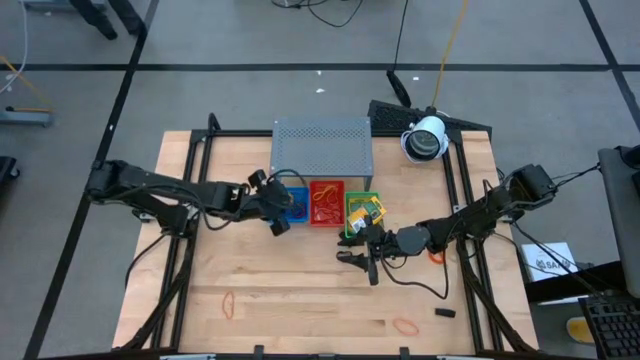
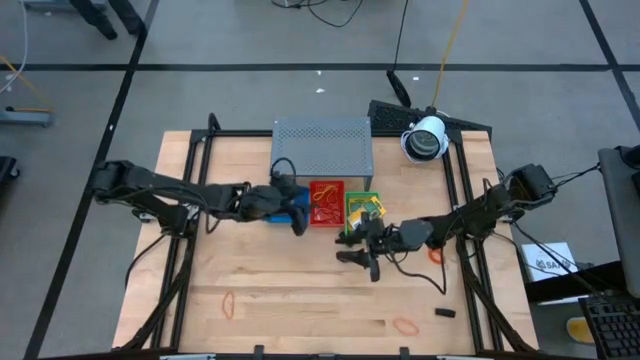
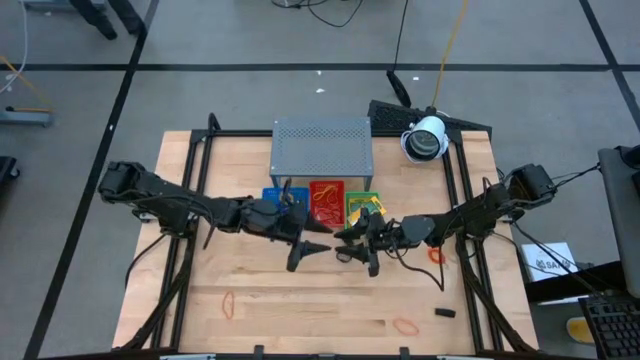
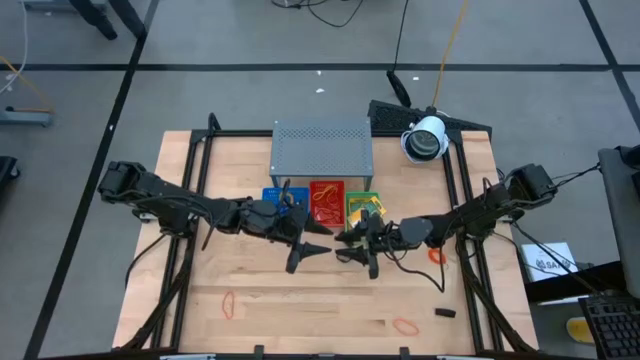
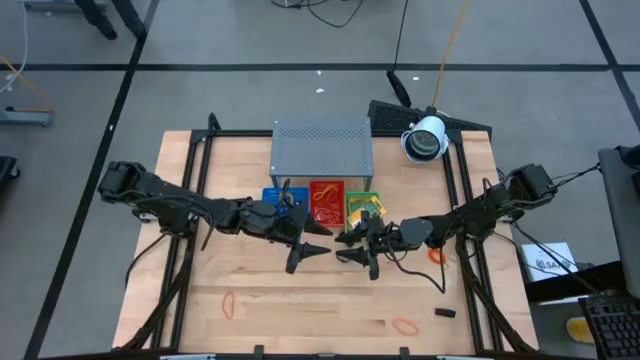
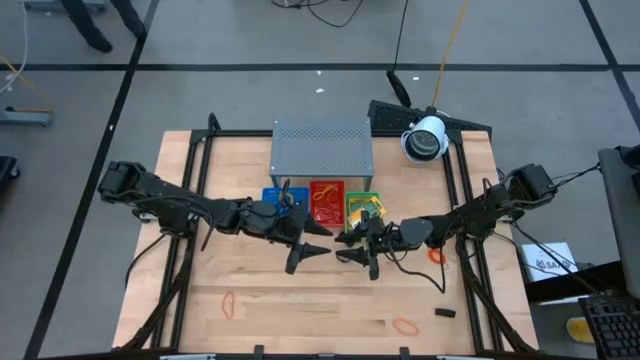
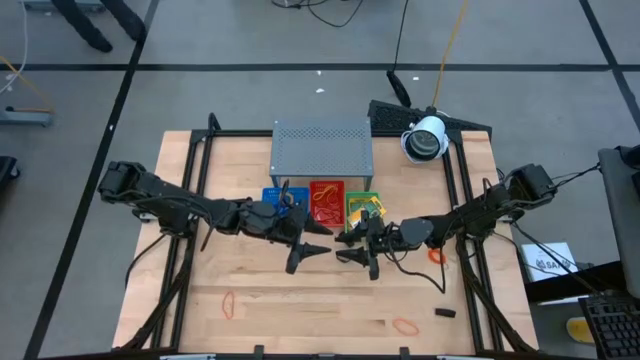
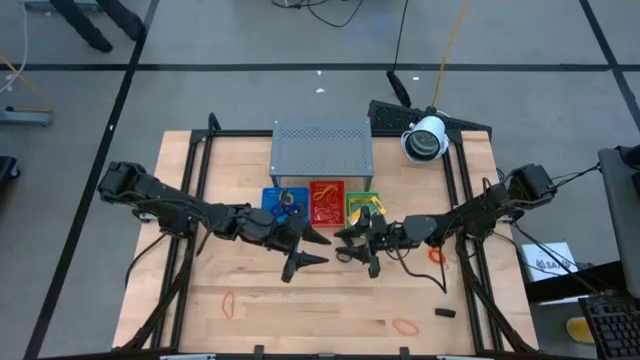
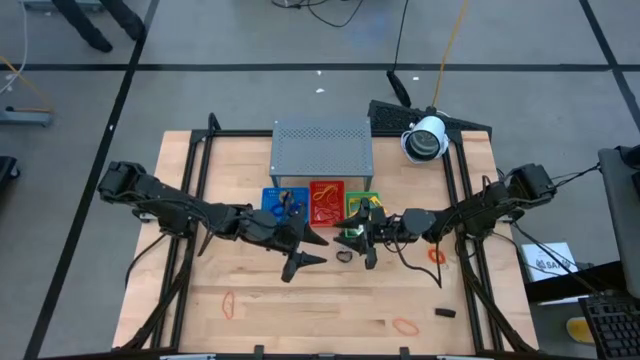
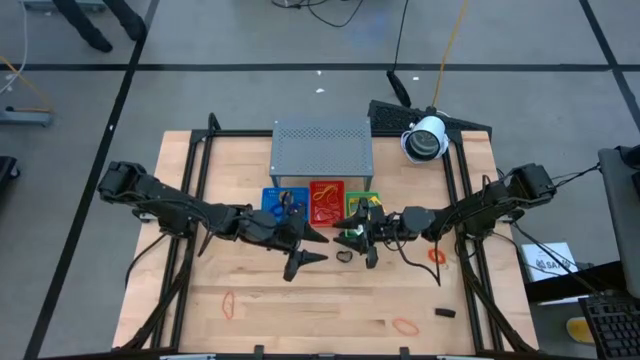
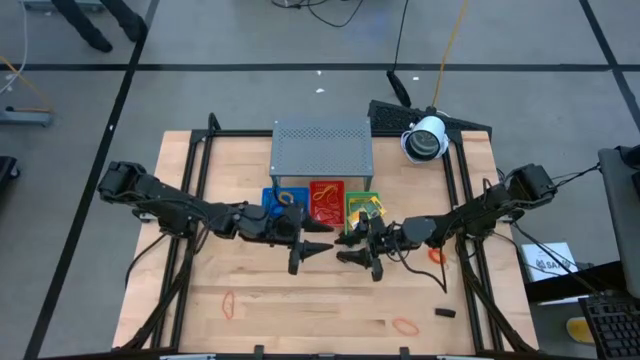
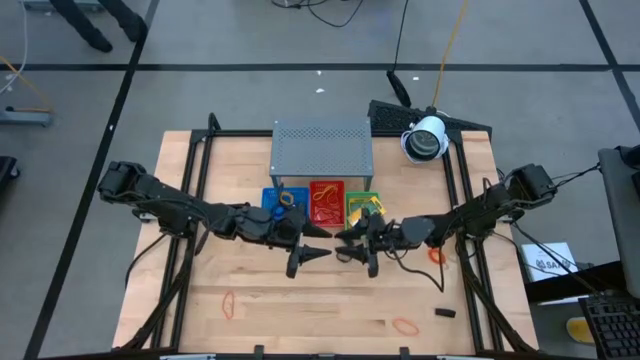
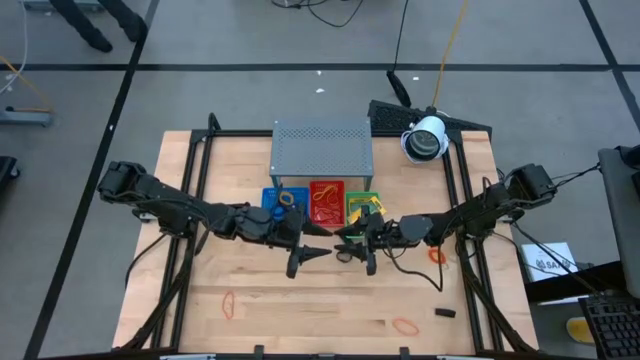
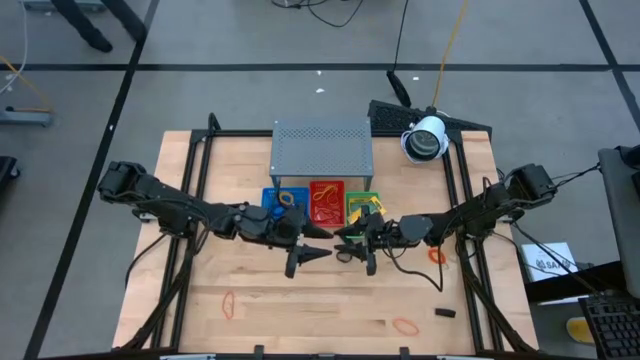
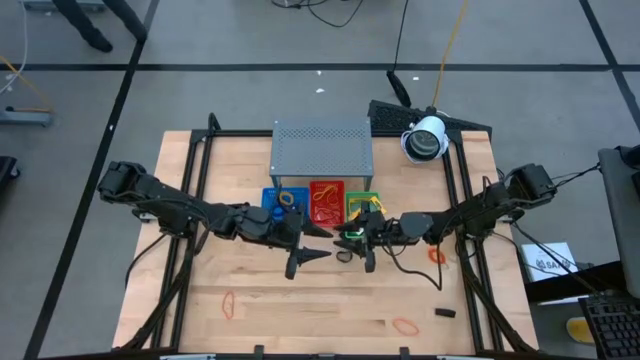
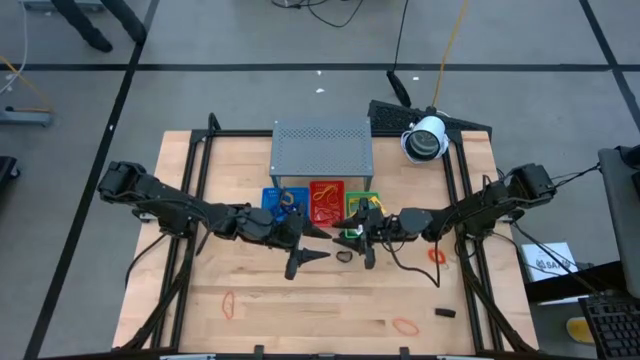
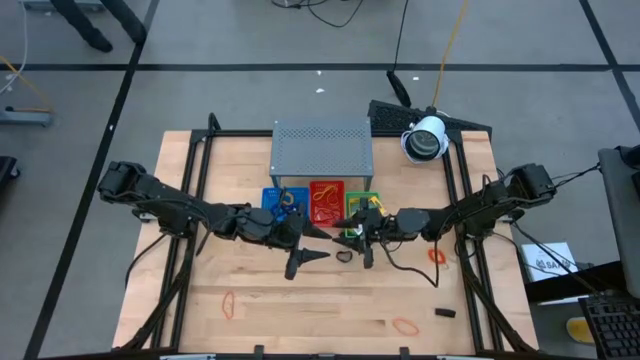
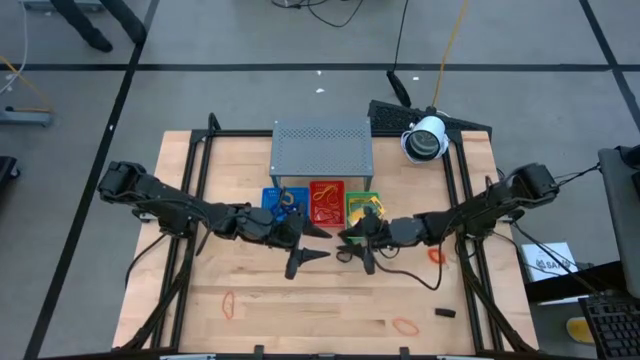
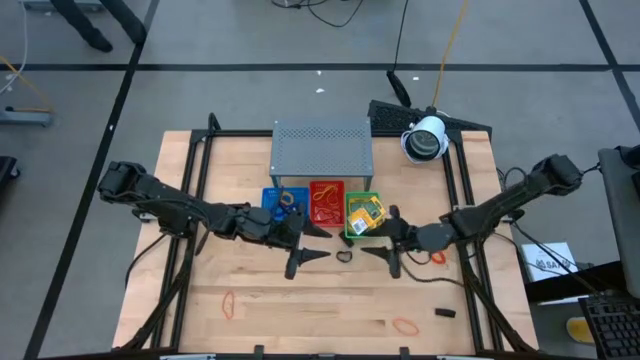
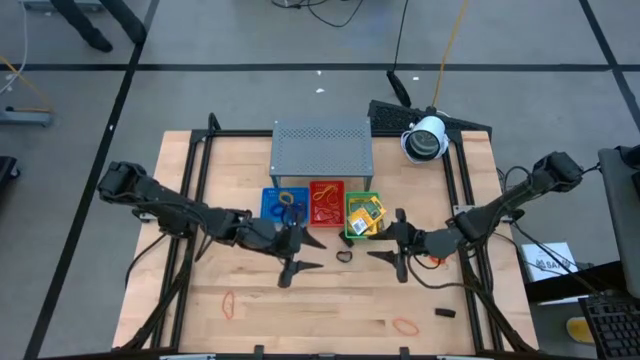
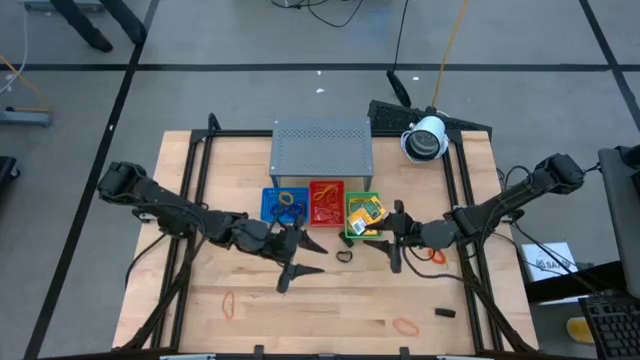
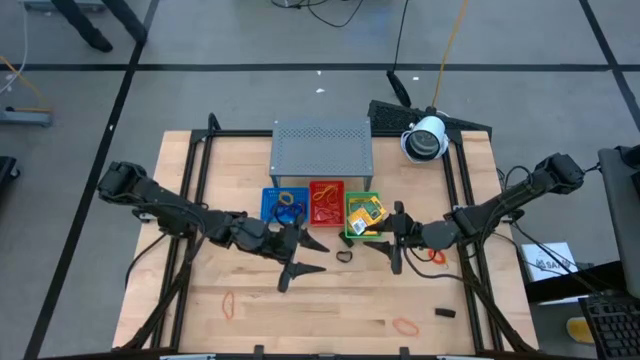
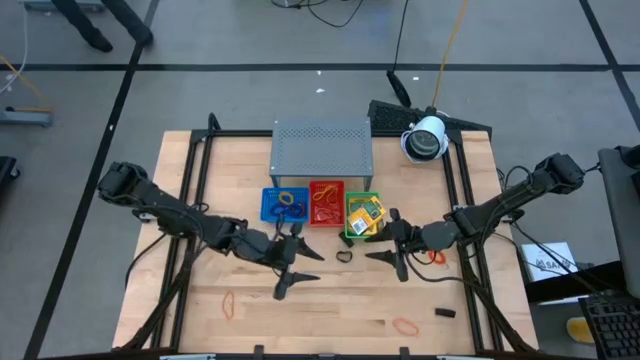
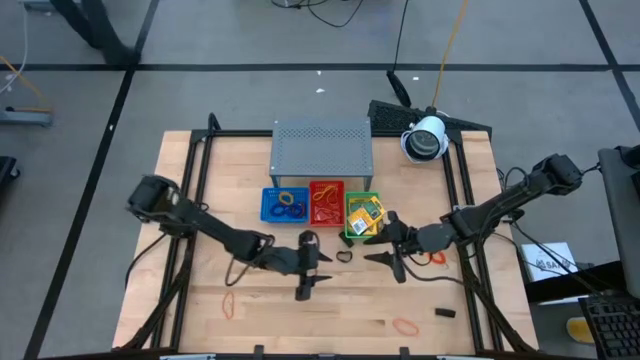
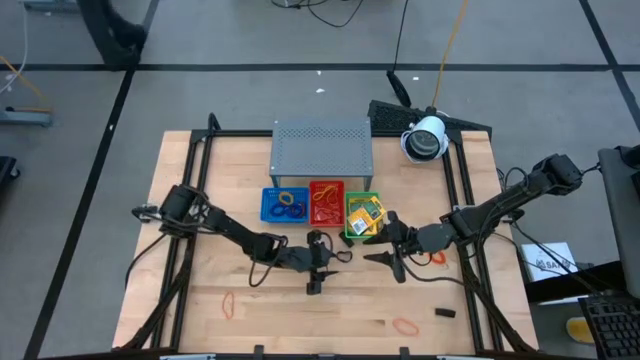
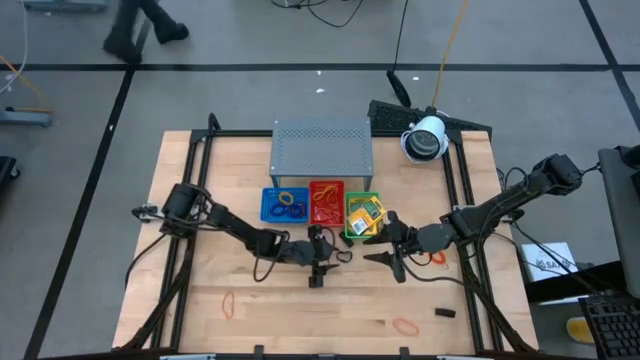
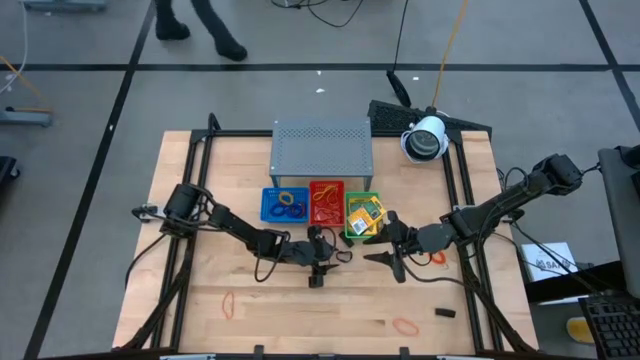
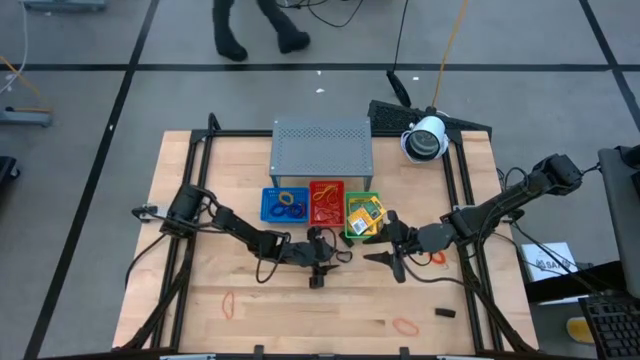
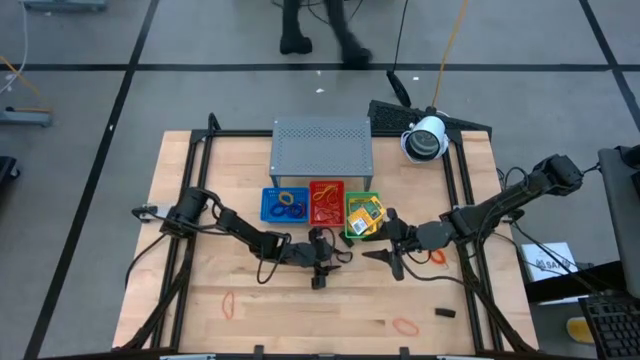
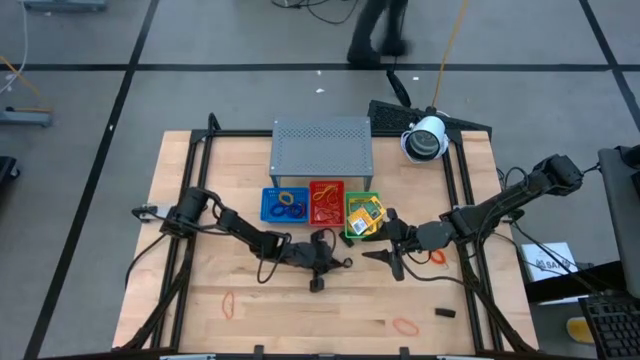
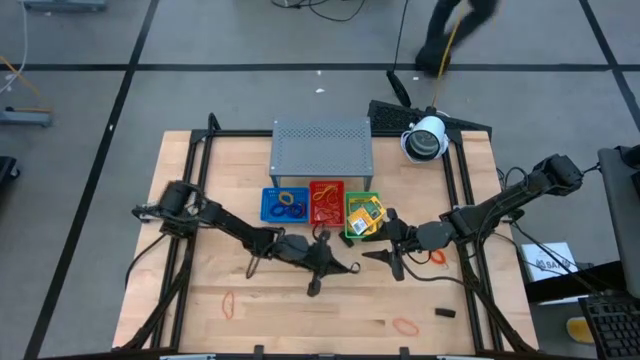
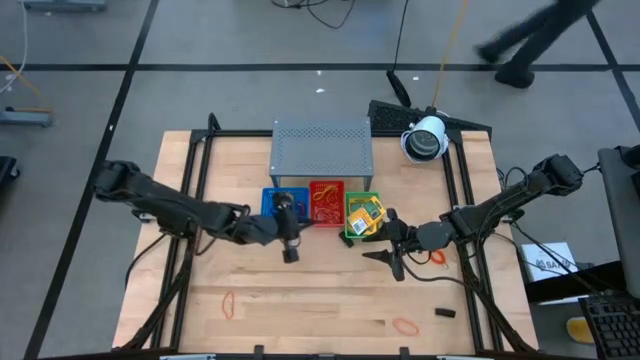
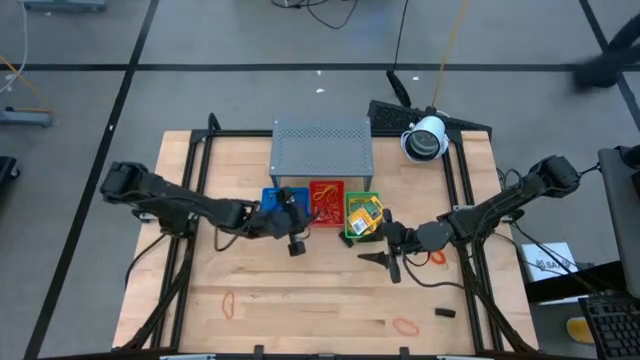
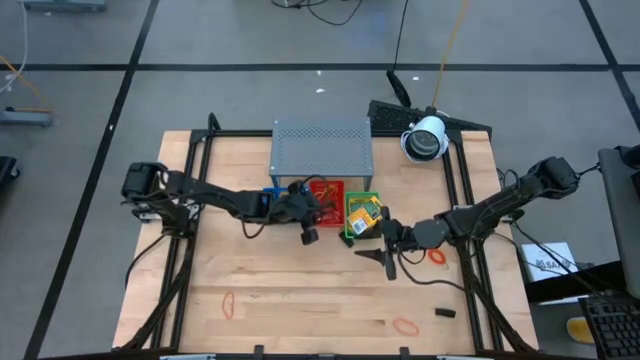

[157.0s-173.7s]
Task: Pick & Place Office Desk Supplies
Put the black rubber band into the red bin

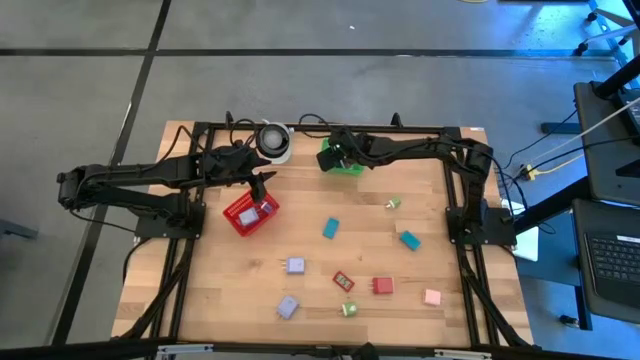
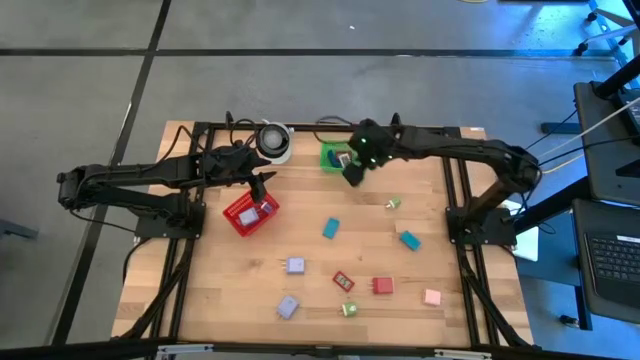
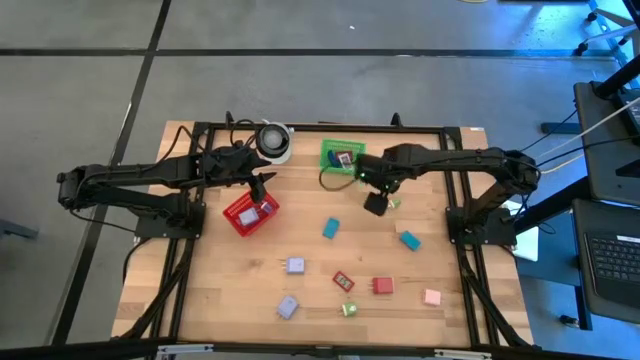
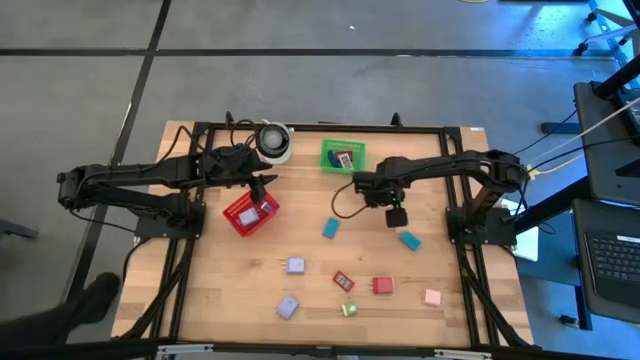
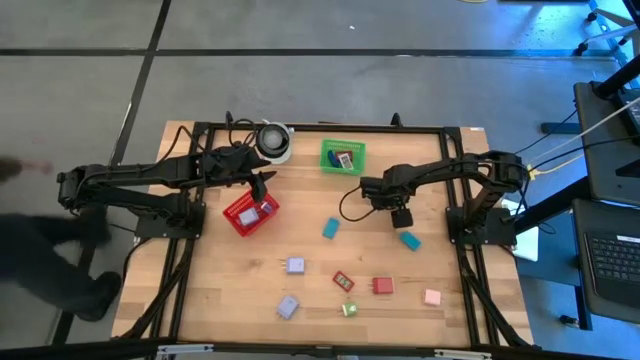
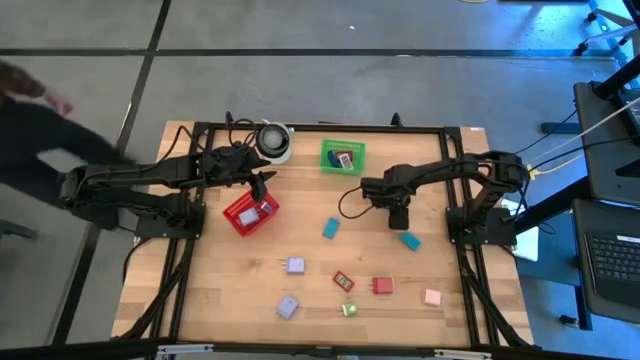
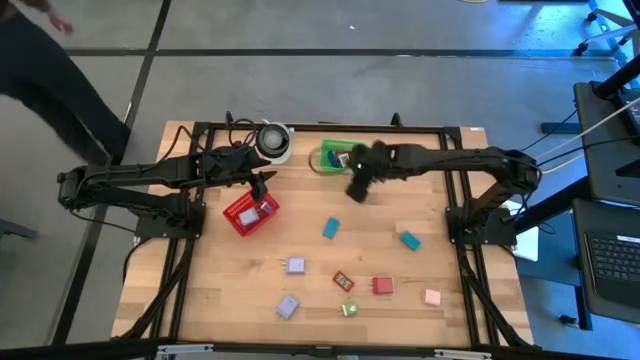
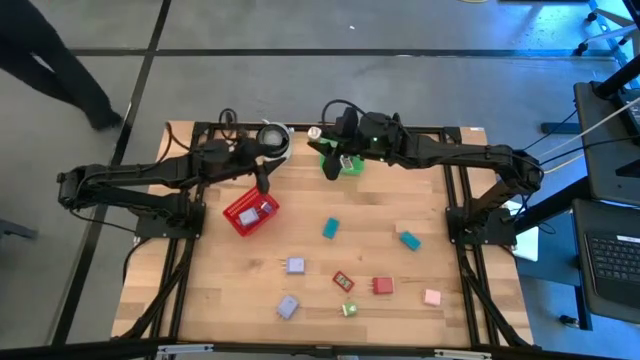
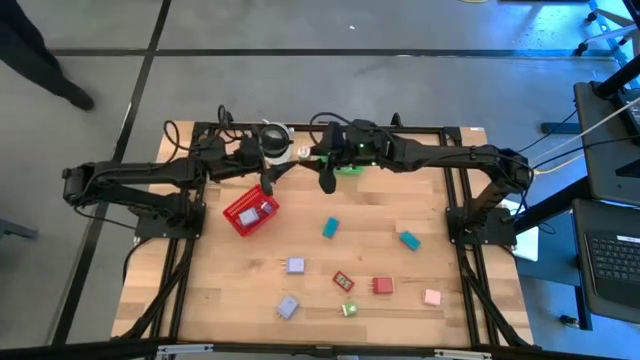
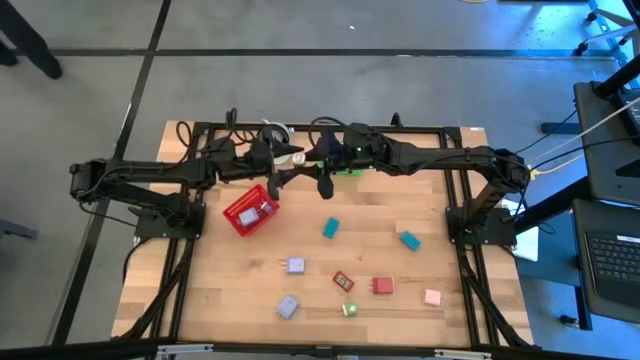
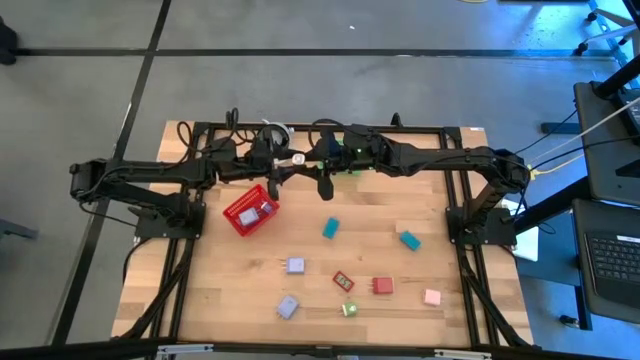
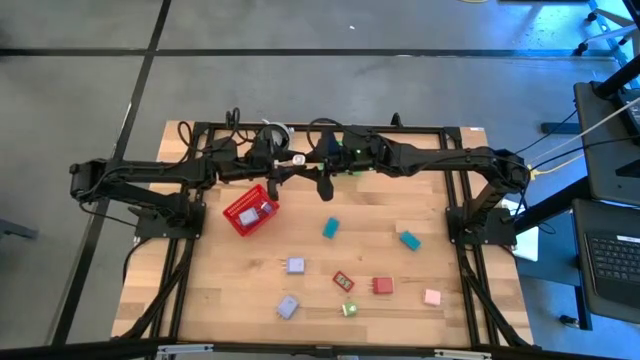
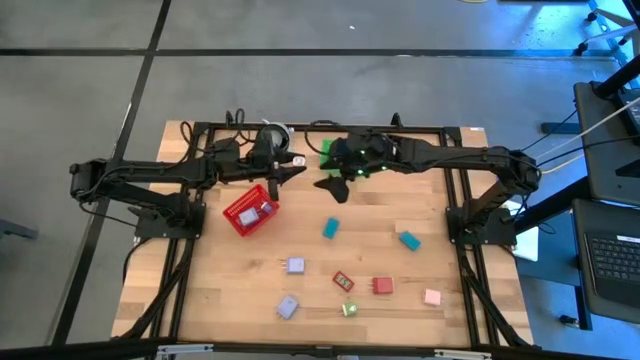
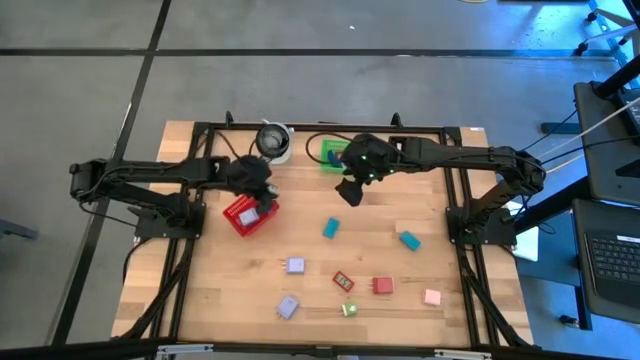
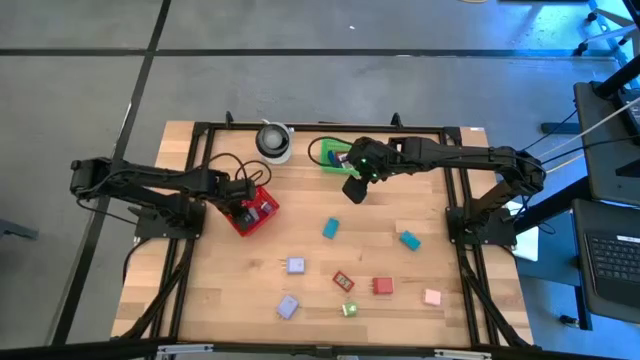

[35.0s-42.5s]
Task: Pick & Place Office items
Put the top green charger adapter into the red bin
